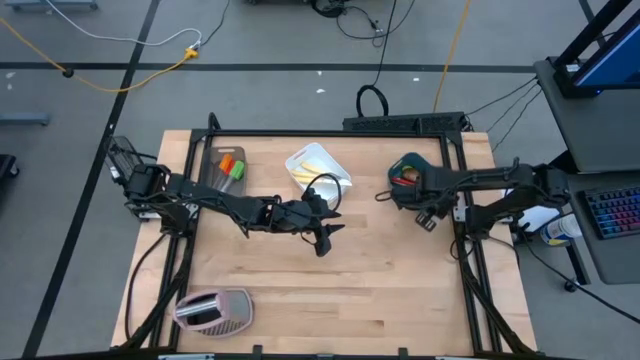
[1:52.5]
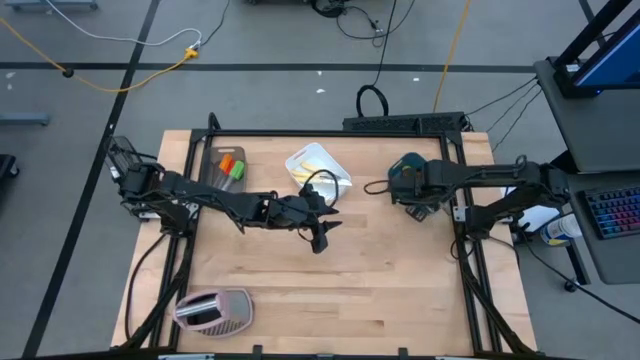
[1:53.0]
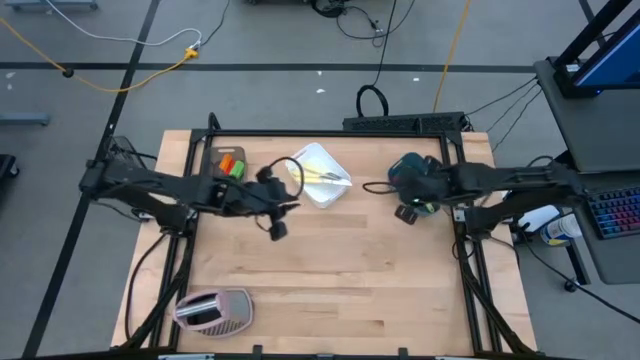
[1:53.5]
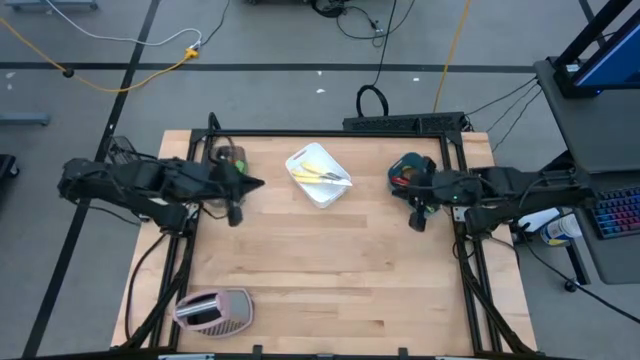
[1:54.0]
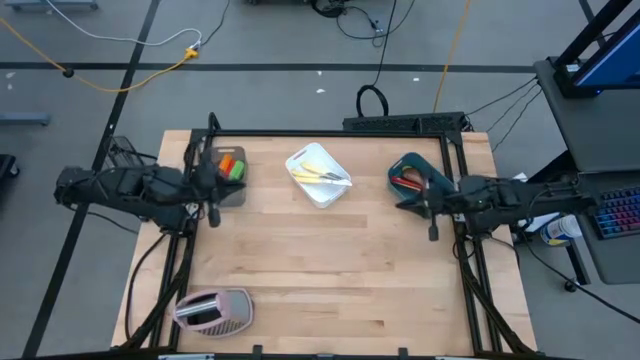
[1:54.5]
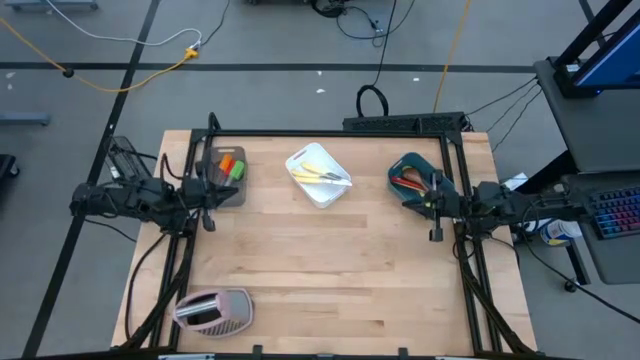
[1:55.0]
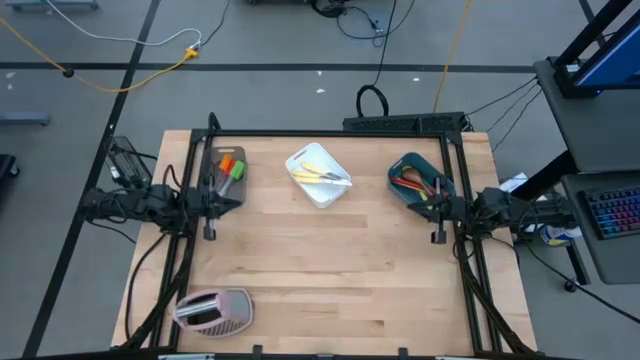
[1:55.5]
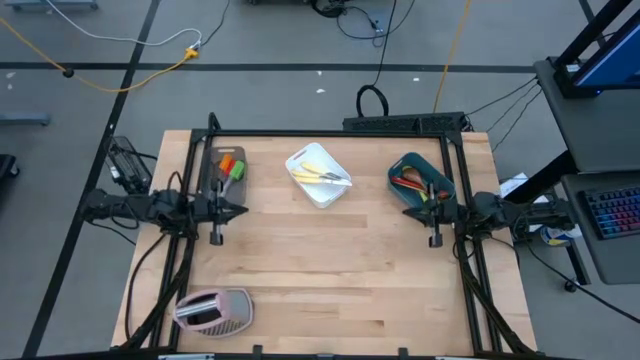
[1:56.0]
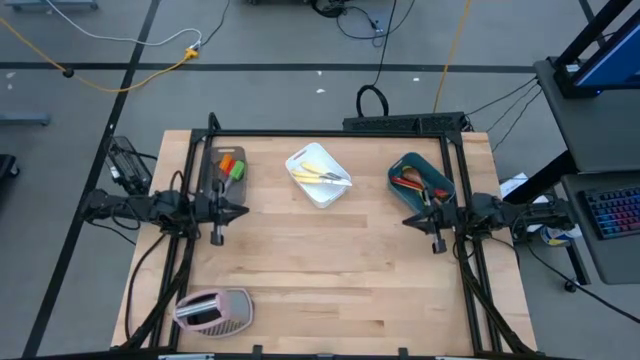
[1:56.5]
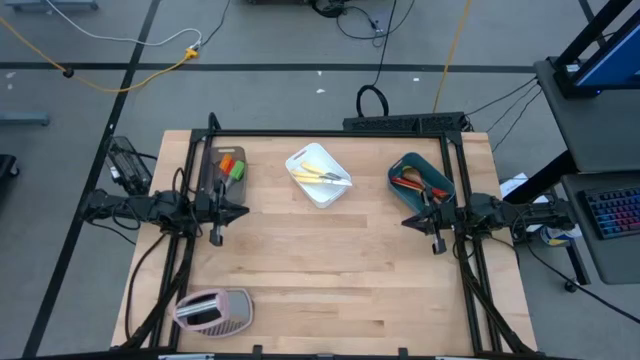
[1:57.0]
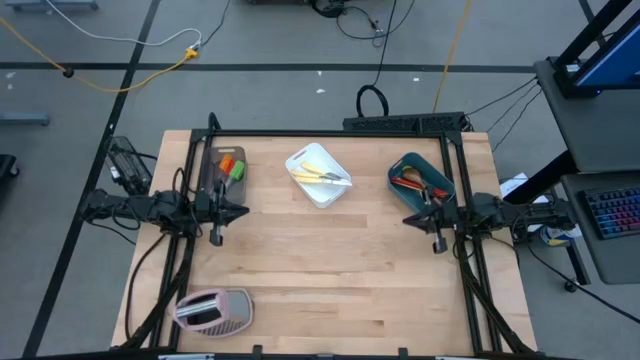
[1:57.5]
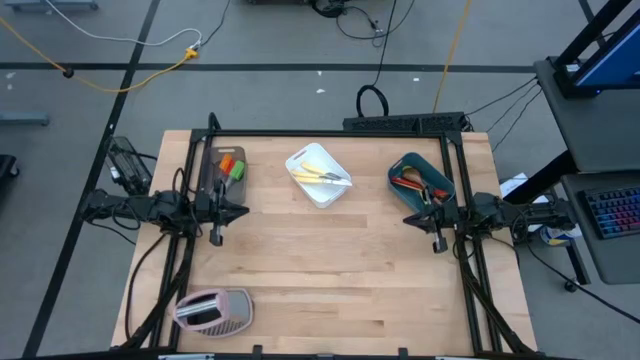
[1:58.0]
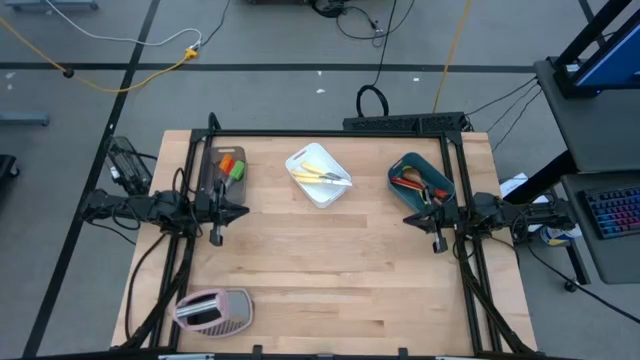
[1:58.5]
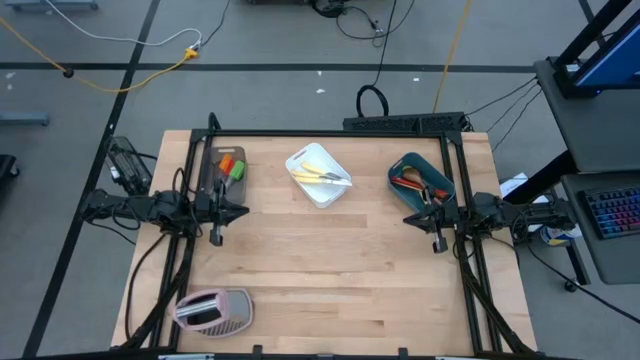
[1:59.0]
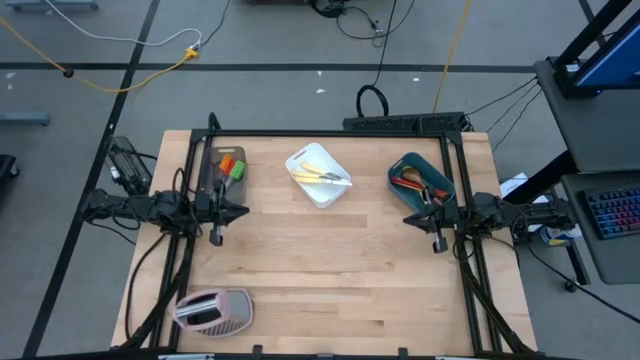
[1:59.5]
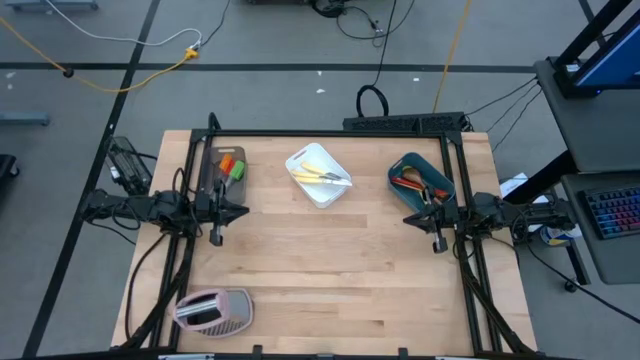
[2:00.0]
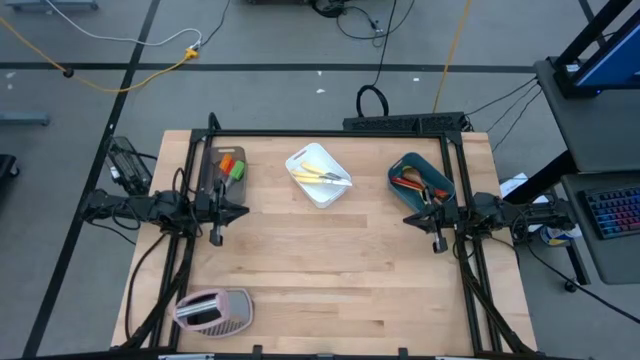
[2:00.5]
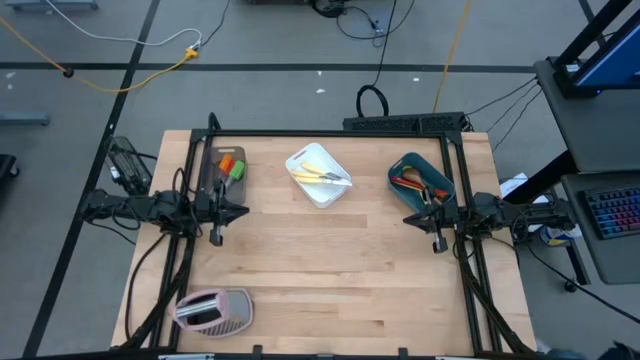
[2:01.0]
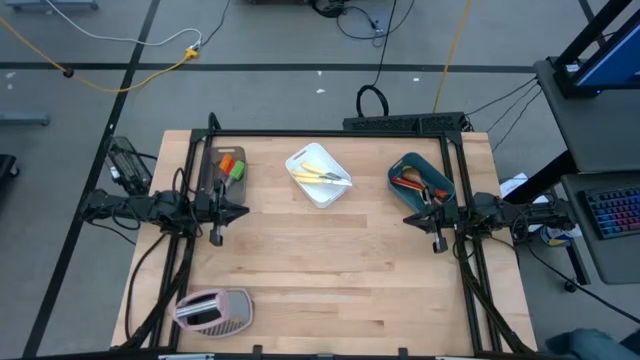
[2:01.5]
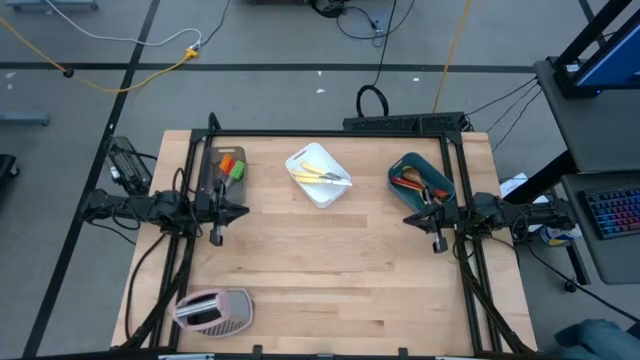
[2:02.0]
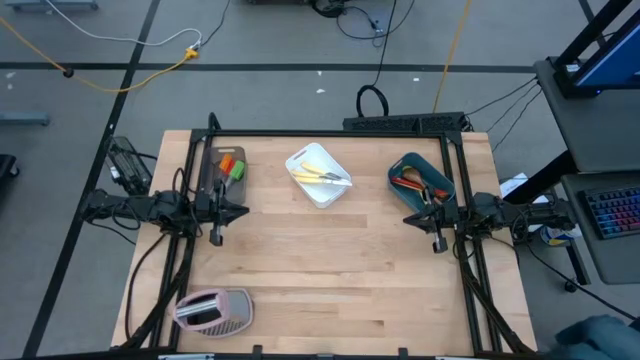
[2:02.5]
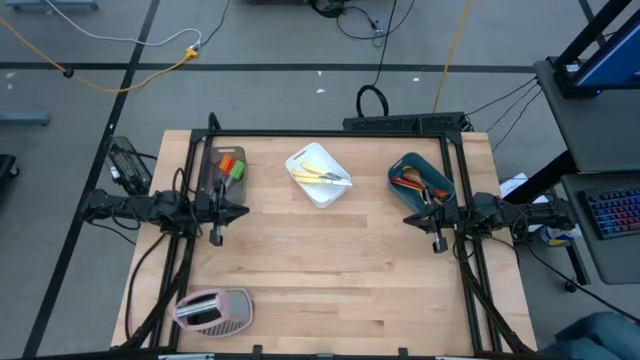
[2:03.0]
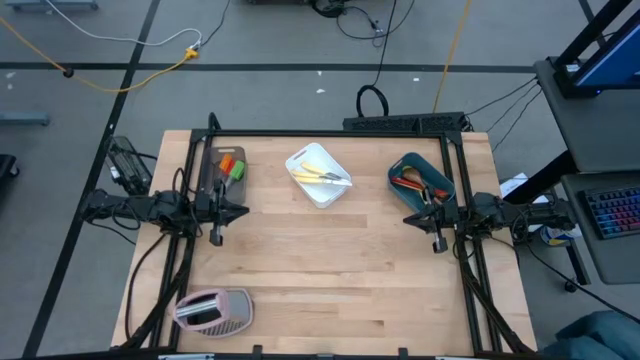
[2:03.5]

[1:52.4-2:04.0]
Task: Pick & Place Kitchen Items
Return to Home Position

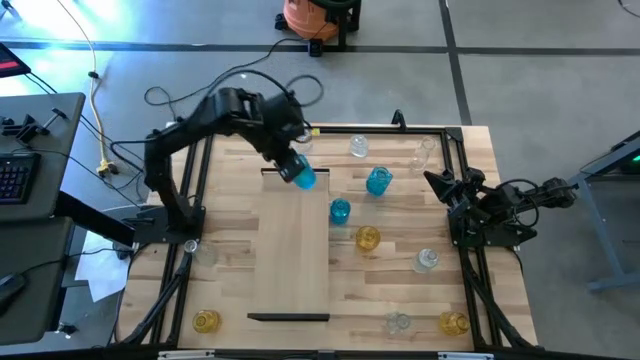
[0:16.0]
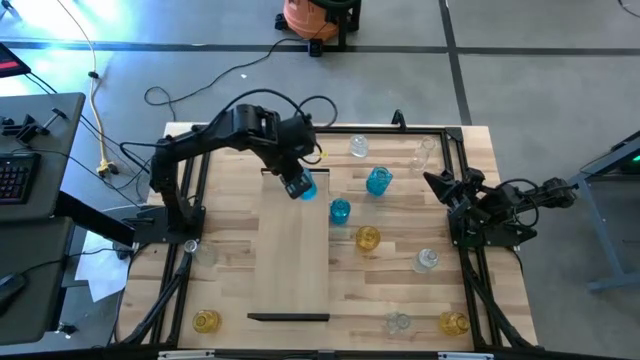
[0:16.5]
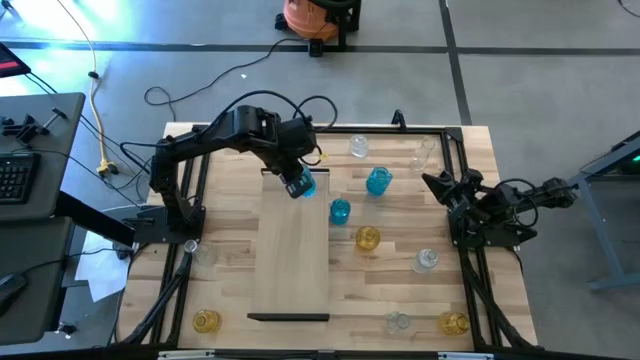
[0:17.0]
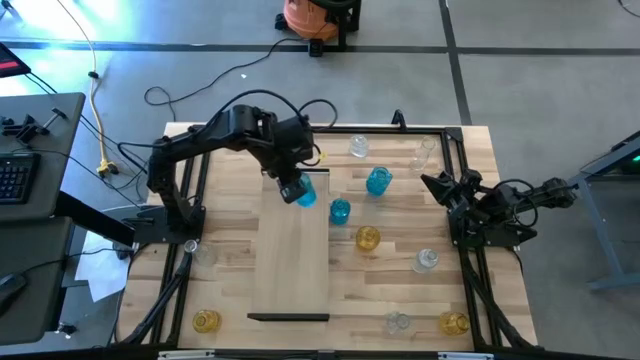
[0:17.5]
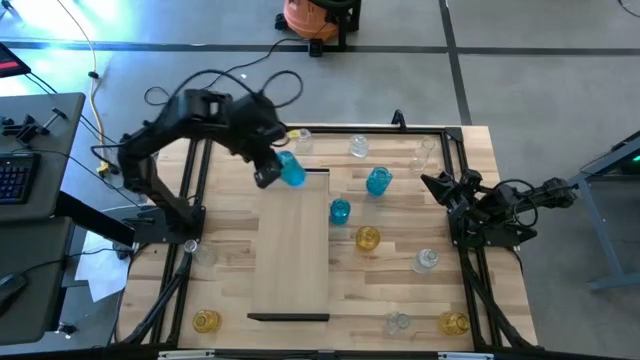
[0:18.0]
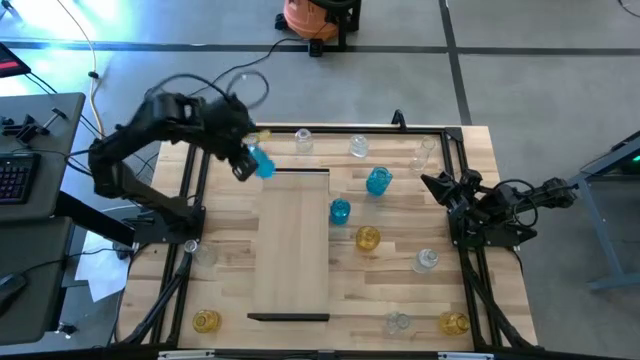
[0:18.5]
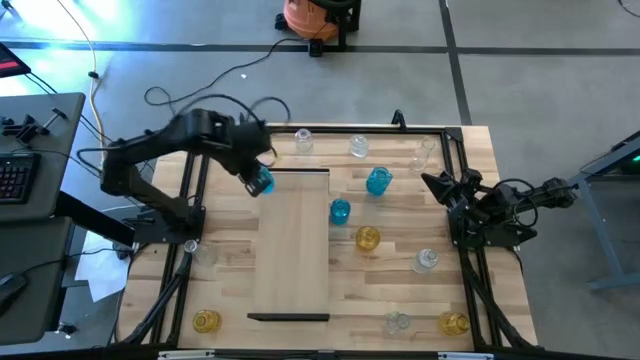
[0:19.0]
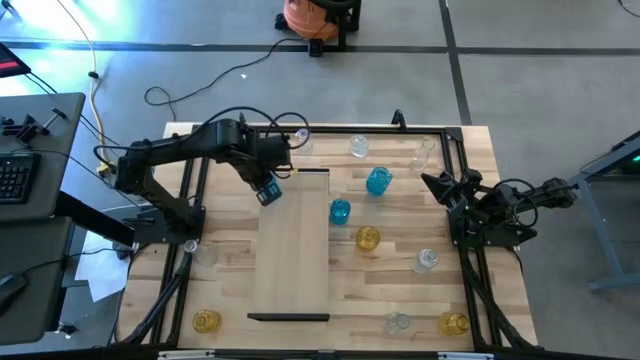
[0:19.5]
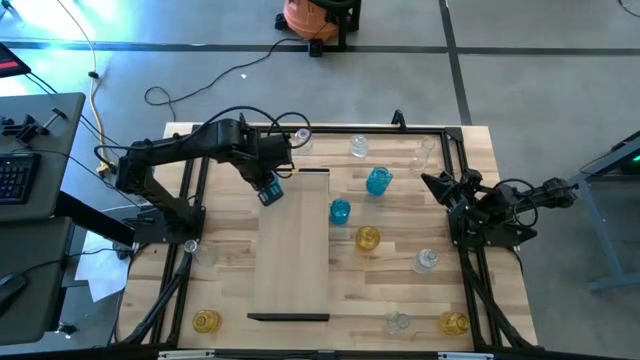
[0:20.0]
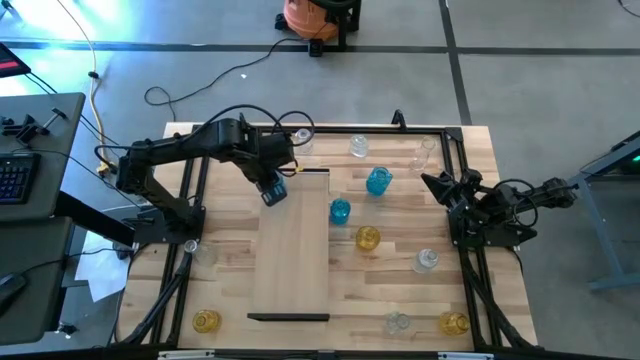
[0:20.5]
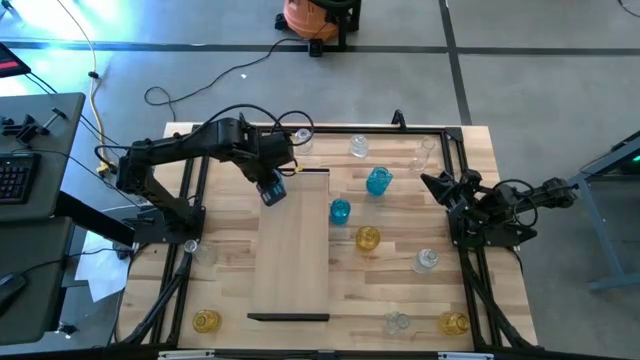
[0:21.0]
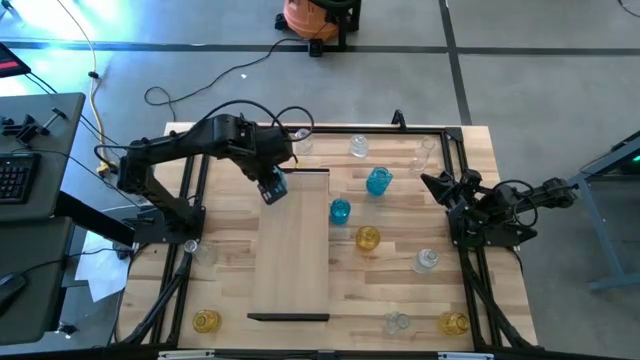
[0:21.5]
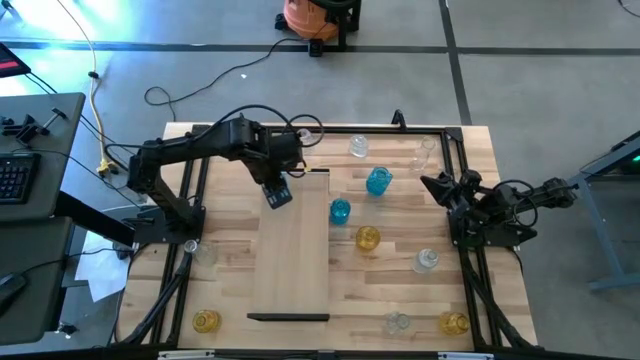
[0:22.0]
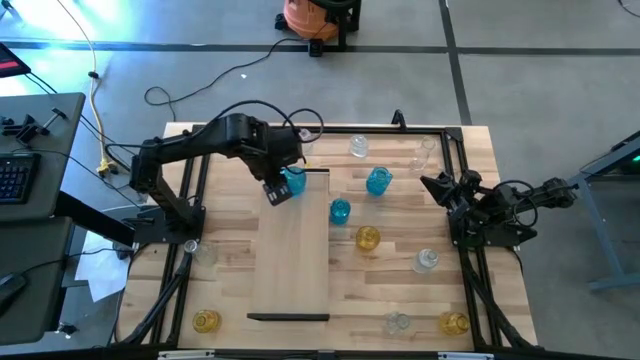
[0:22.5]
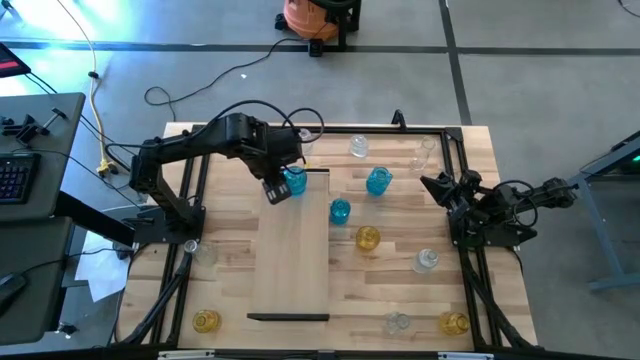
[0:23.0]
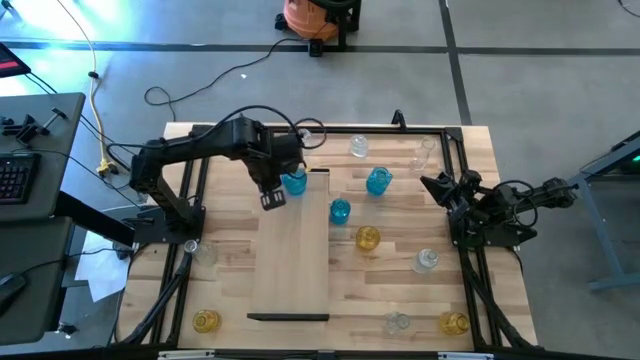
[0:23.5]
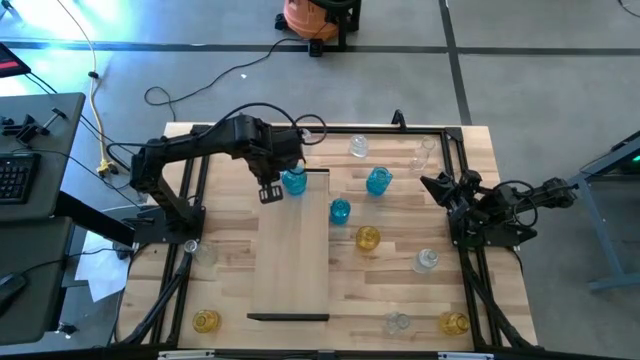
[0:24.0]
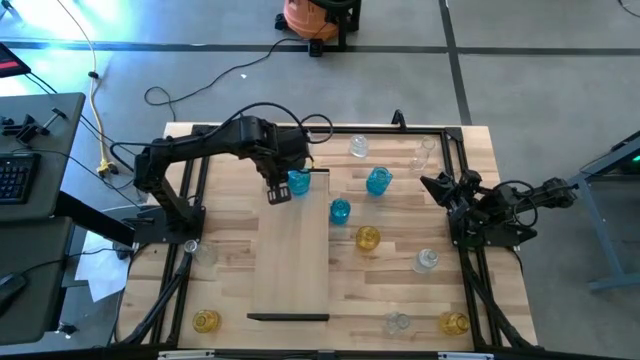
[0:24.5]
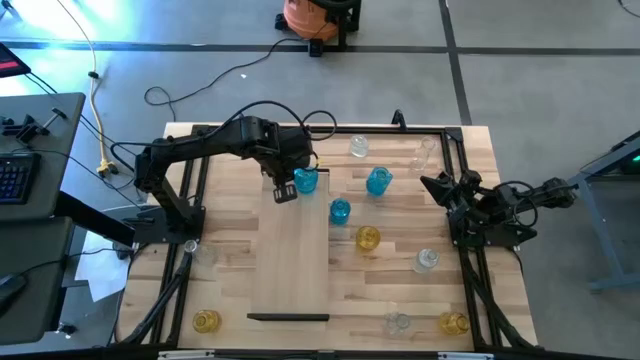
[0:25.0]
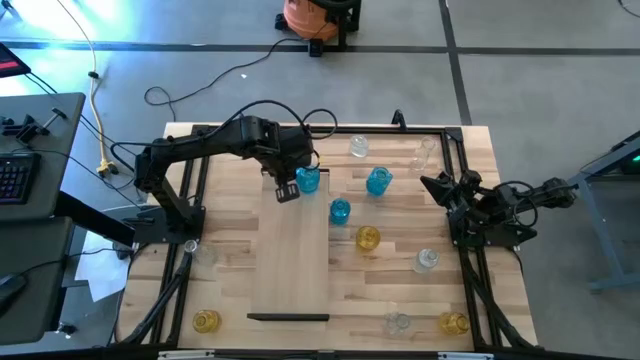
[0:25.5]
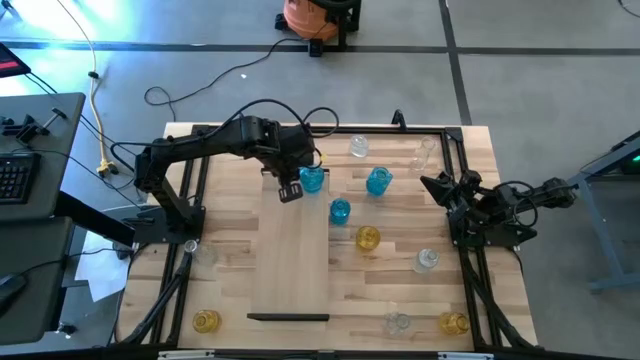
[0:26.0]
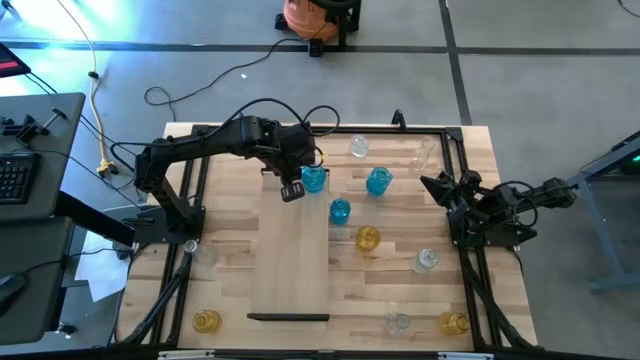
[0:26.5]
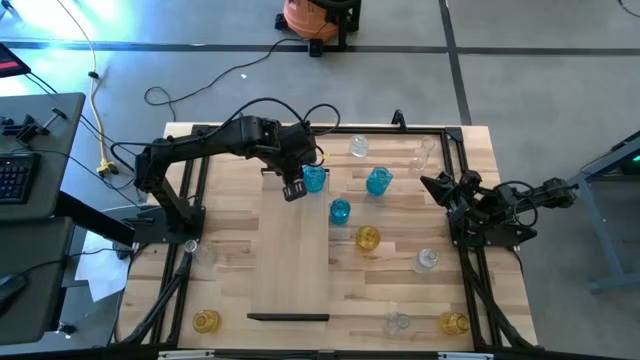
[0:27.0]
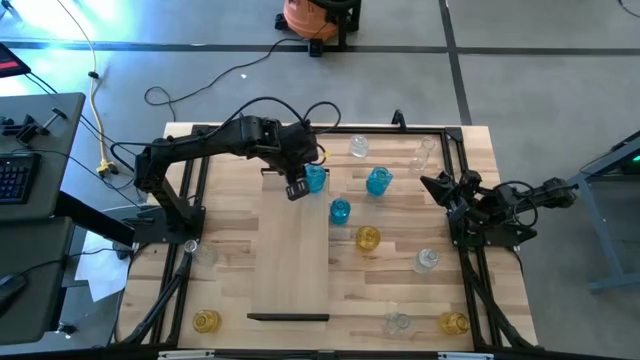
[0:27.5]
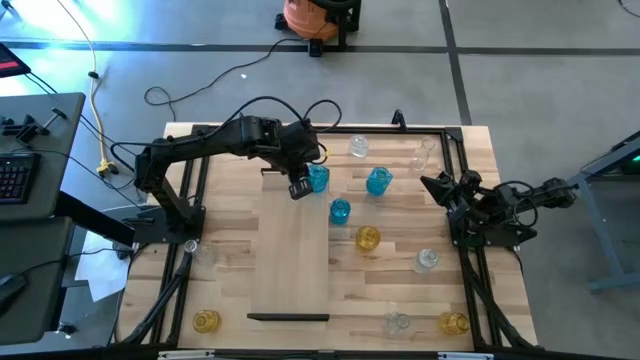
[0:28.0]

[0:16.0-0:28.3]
Task: sort vases onto shelf
Put the left blue vase on the shelf
